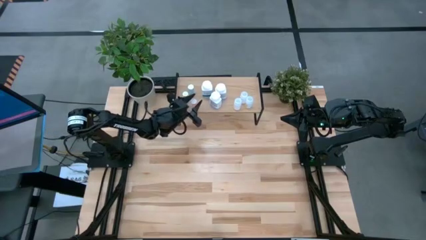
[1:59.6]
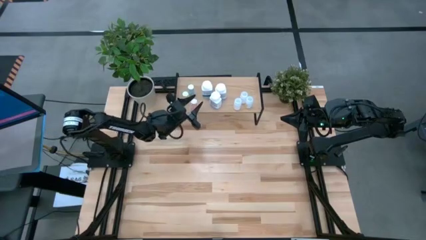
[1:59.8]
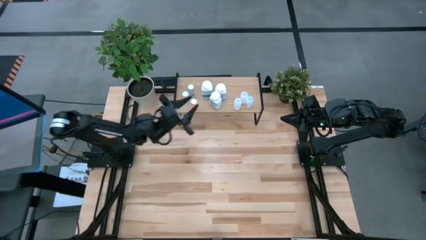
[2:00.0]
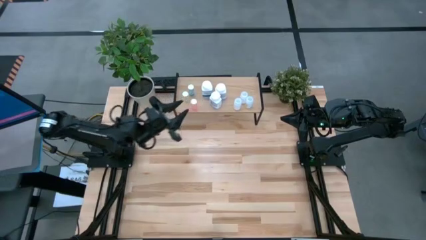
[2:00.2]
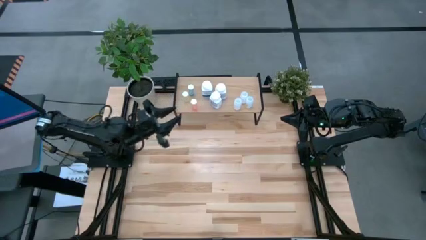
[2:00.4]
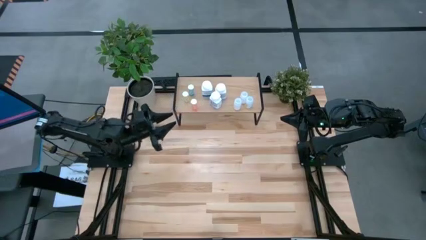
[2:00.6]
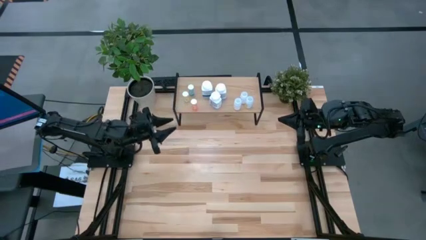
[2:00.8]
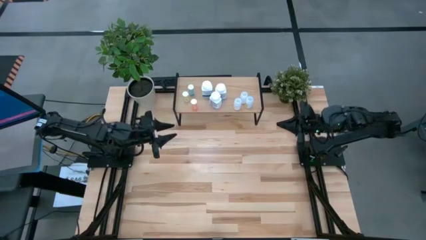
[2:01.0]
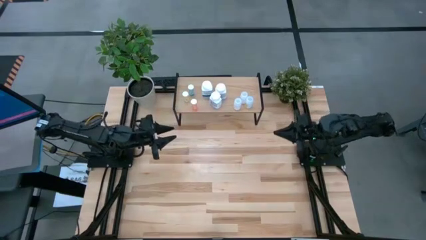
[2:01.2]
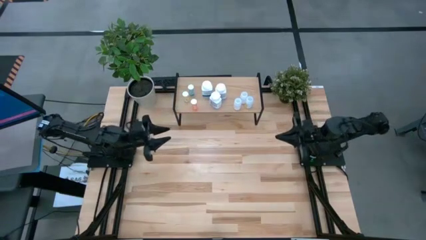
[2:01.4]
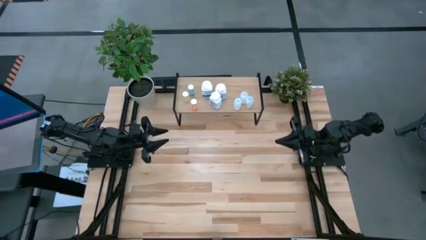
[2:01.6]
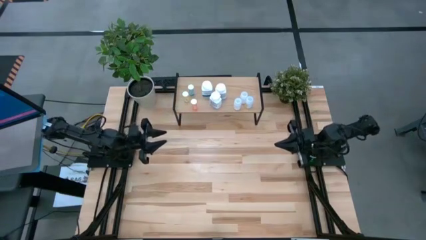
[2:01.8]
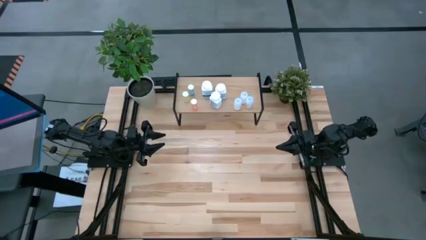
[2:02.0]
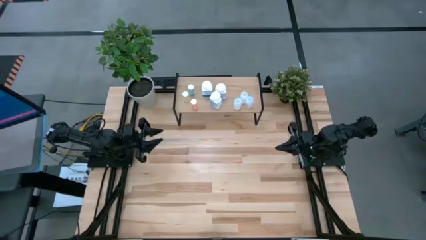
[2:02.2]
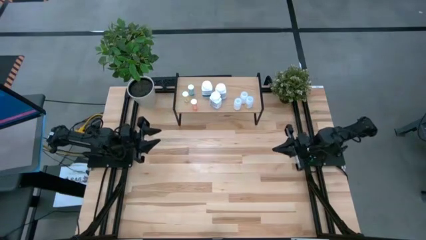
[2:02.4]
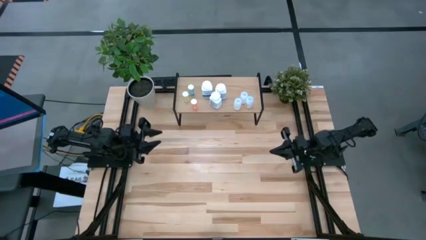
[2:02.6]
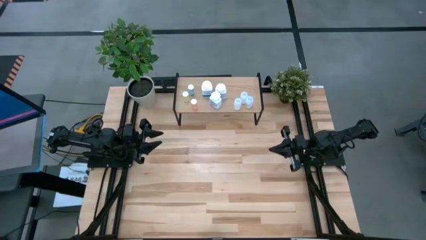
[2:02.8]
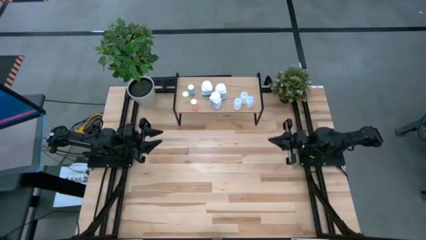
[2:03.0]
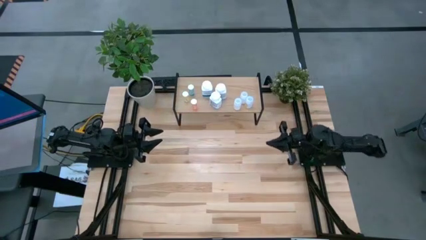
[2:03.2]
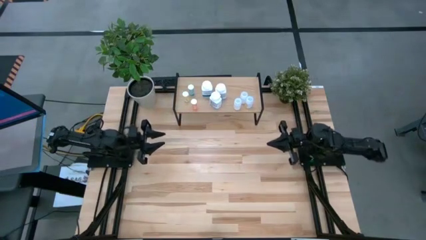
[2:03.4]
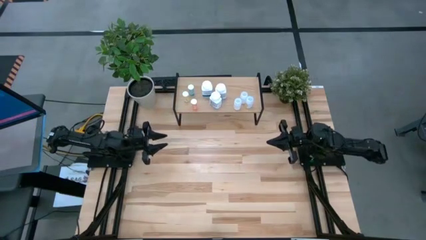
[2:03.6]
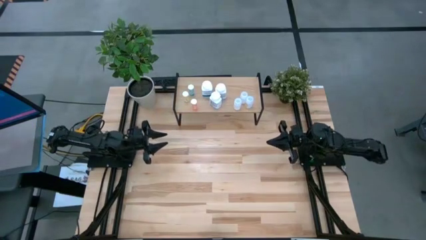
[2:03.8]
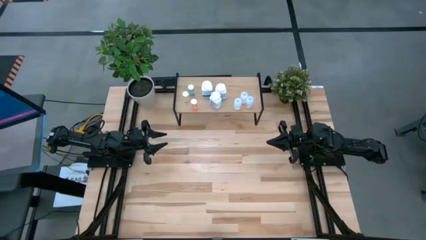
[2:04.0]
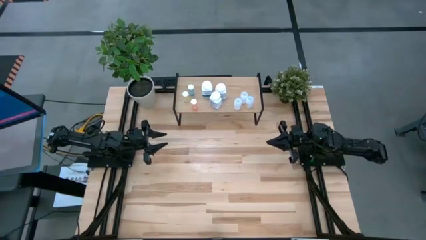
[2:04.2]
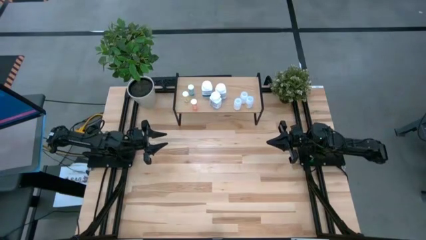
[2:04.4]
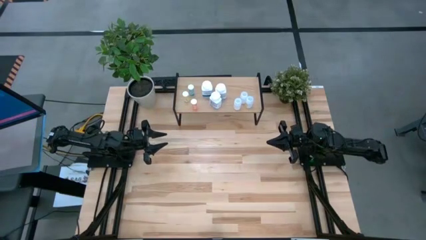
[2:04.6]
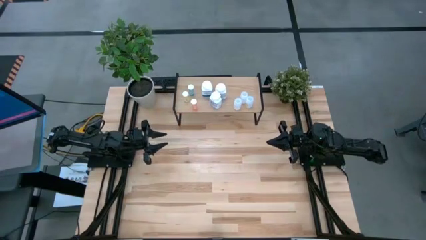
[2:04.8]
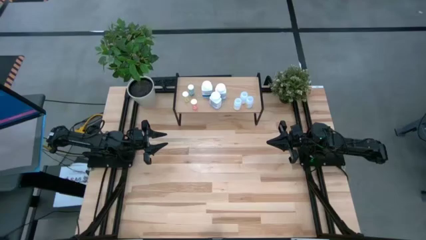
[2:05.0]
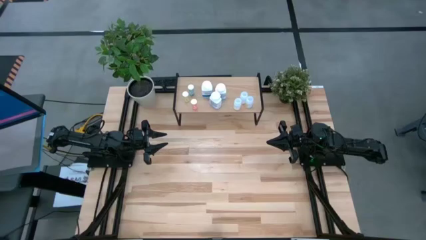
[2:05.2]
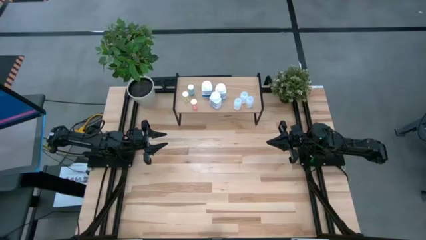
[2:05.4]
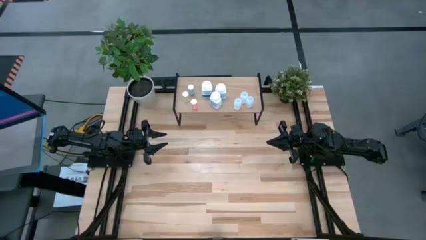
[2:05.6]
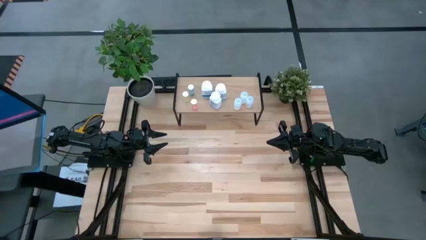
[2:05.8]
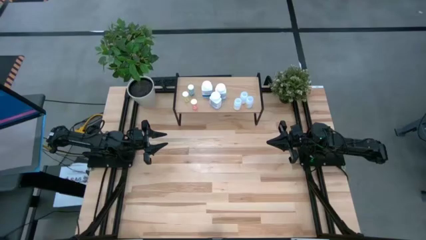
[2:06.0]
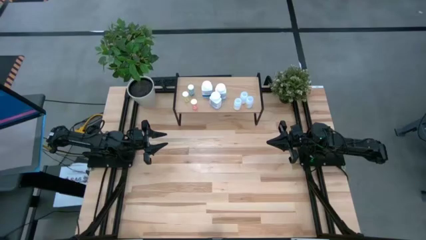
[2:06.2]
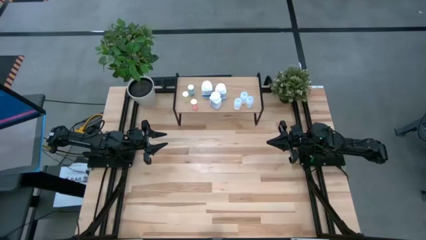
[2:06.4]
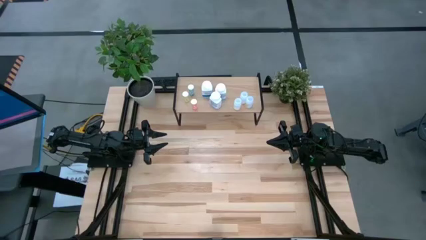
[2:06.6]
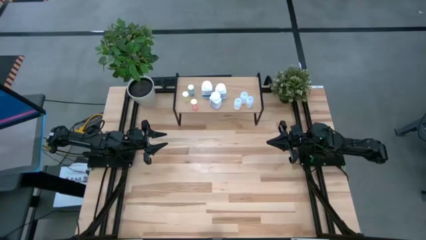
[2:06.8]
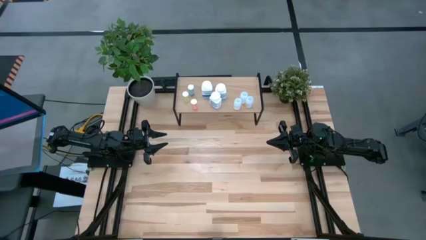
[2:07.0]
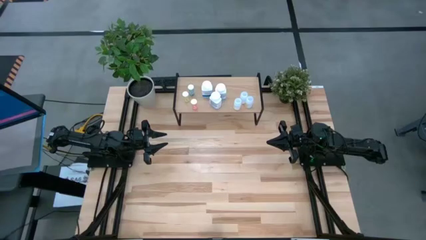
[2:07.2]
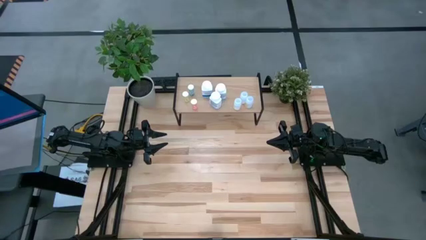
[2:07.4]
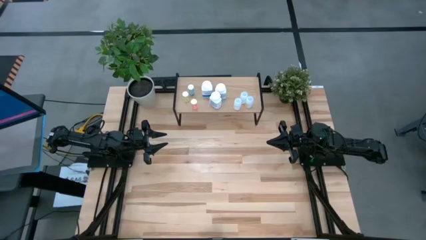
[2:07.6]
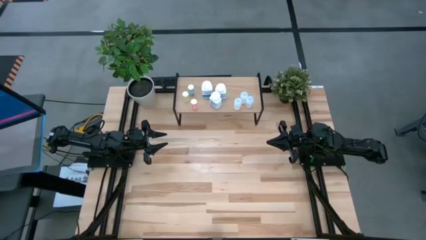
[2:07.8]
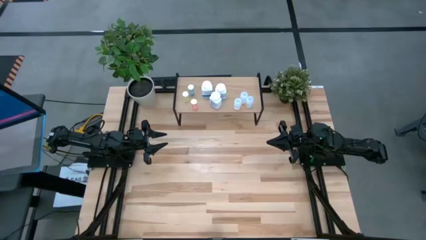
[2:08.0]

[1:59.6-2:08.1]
Task: Pick and place medicine bottles onto shelf by color
Return to Home Position

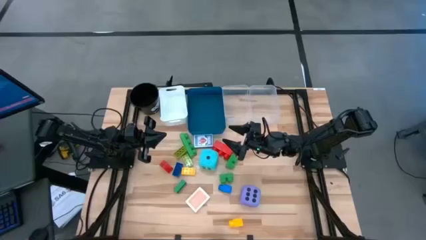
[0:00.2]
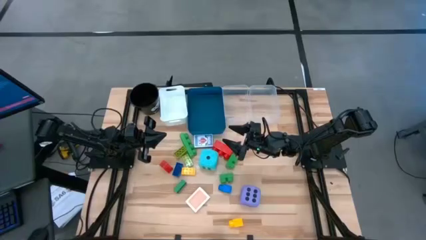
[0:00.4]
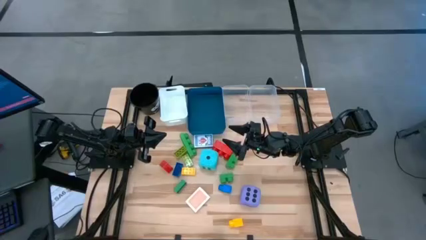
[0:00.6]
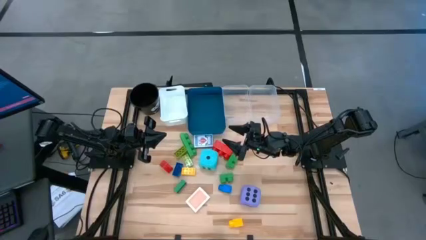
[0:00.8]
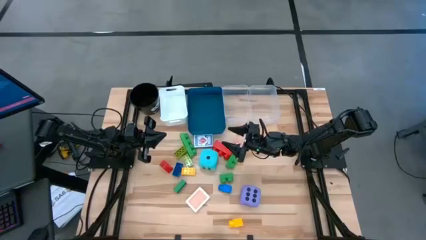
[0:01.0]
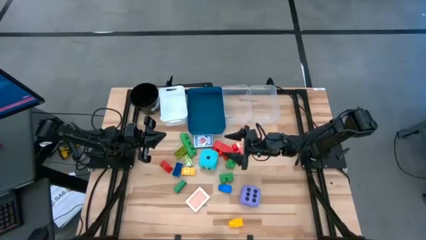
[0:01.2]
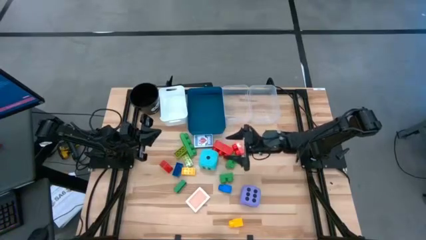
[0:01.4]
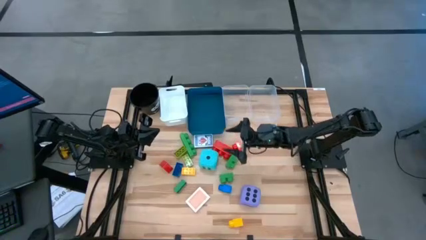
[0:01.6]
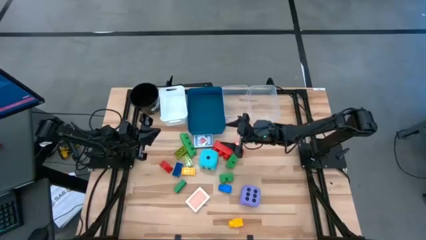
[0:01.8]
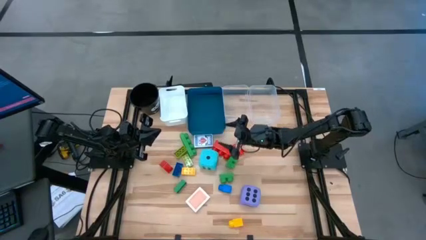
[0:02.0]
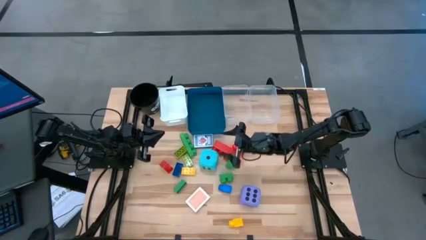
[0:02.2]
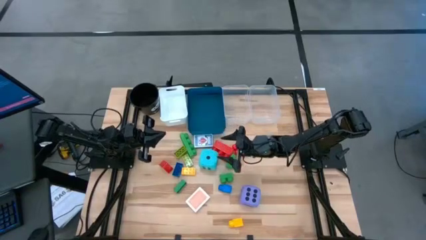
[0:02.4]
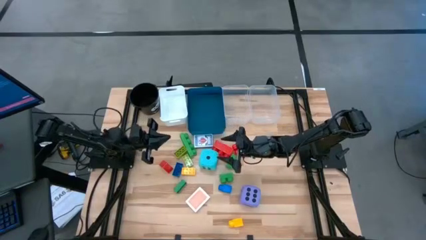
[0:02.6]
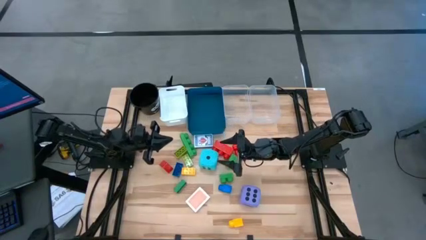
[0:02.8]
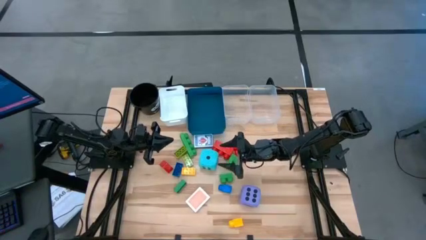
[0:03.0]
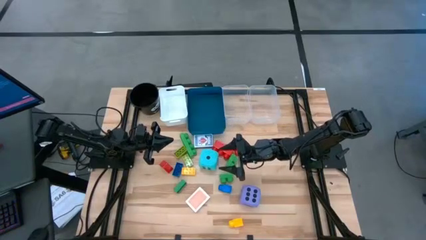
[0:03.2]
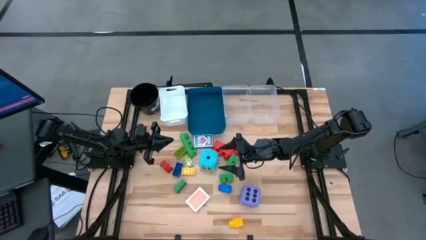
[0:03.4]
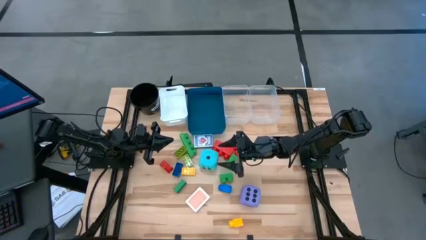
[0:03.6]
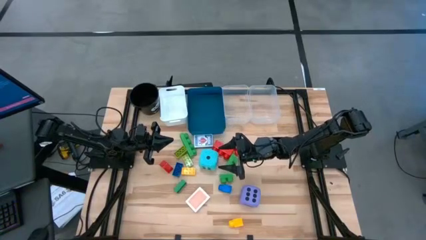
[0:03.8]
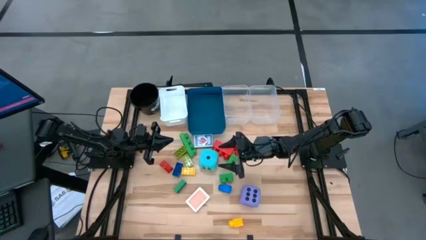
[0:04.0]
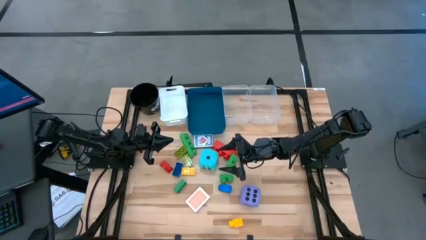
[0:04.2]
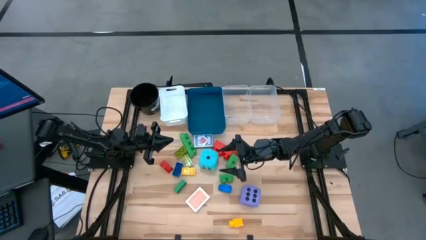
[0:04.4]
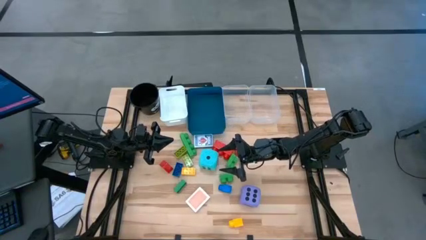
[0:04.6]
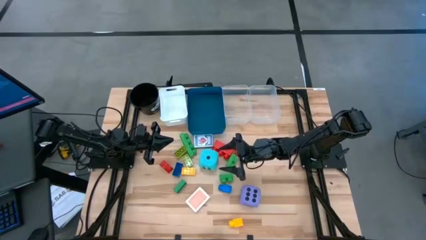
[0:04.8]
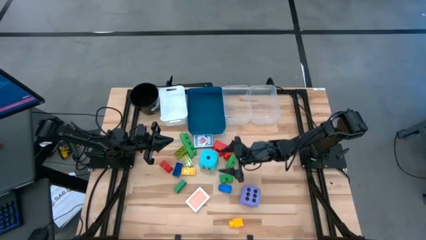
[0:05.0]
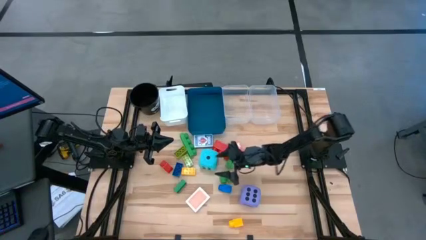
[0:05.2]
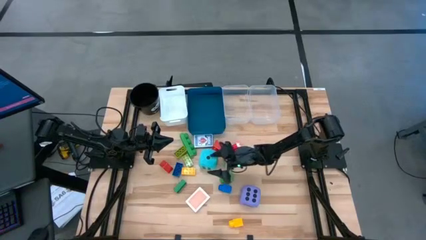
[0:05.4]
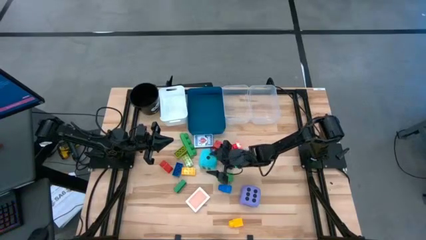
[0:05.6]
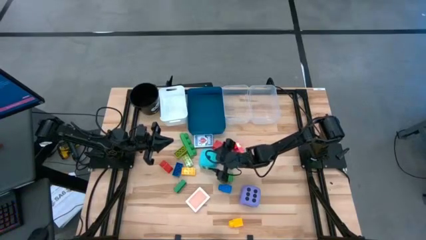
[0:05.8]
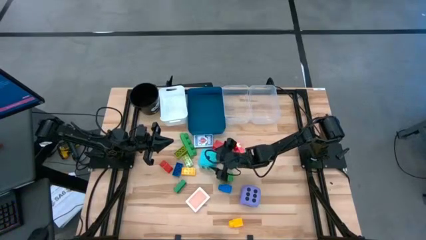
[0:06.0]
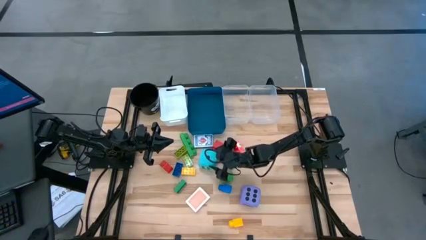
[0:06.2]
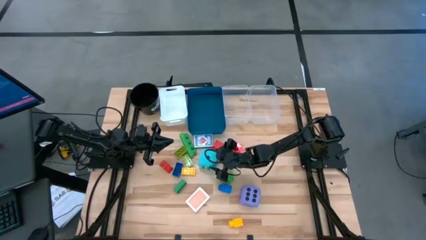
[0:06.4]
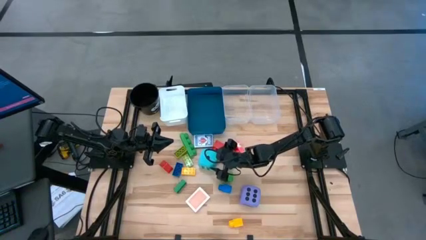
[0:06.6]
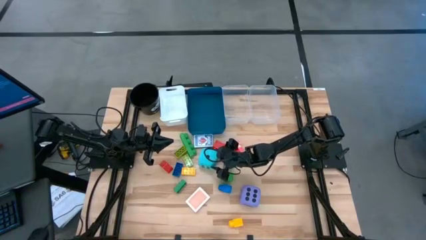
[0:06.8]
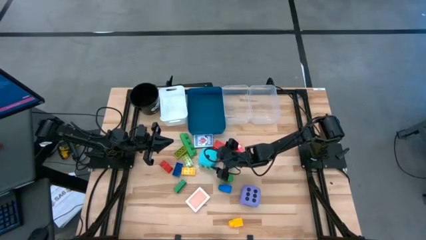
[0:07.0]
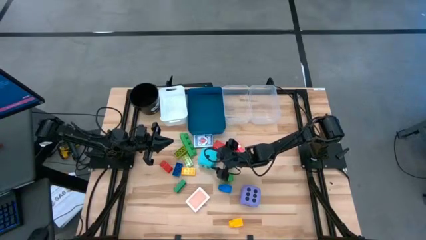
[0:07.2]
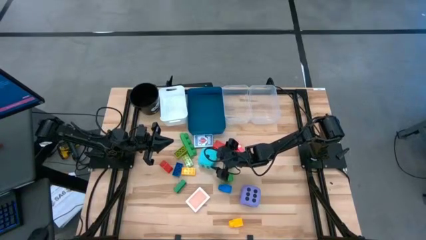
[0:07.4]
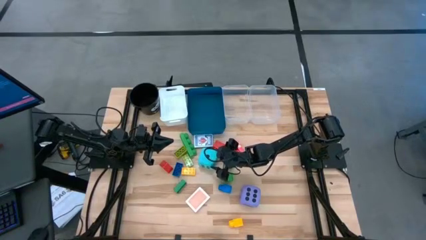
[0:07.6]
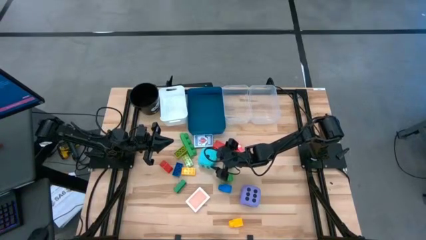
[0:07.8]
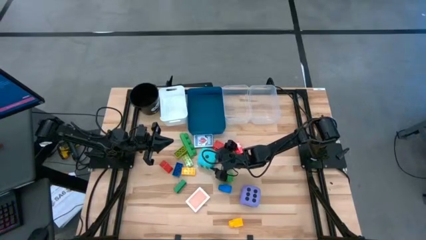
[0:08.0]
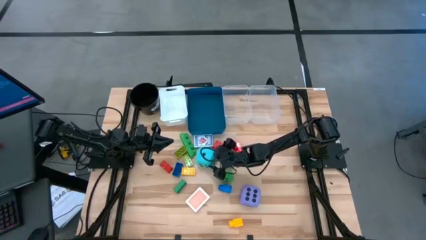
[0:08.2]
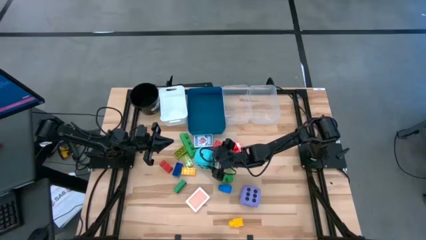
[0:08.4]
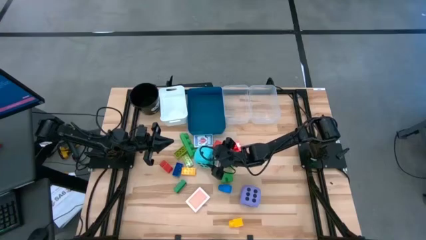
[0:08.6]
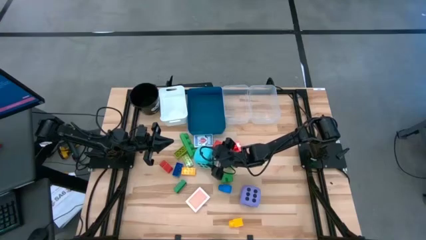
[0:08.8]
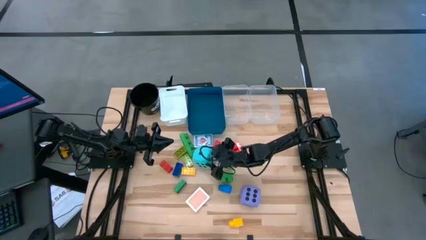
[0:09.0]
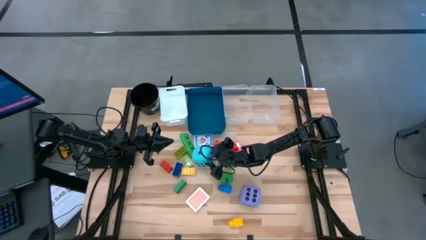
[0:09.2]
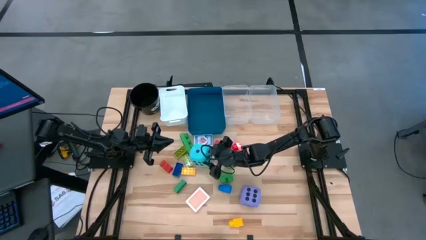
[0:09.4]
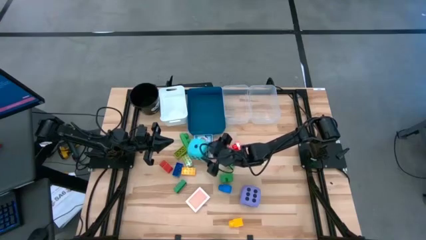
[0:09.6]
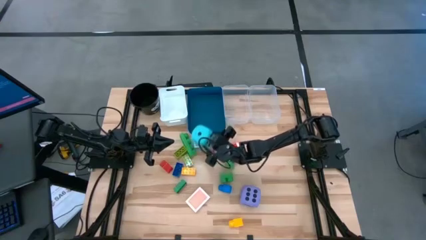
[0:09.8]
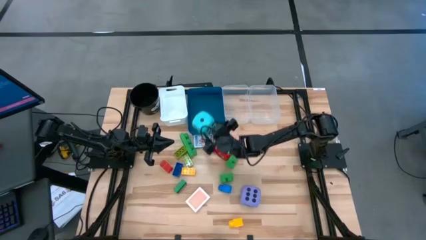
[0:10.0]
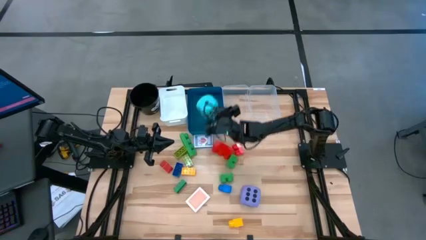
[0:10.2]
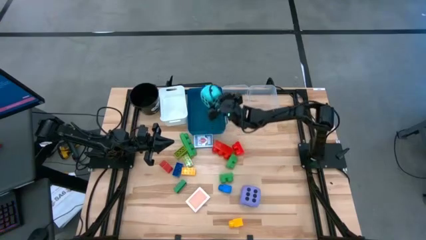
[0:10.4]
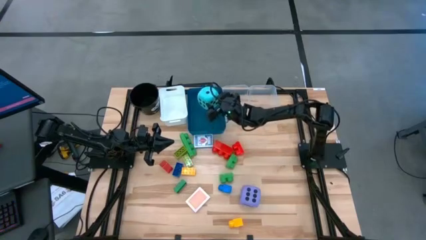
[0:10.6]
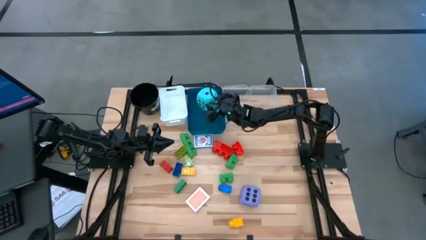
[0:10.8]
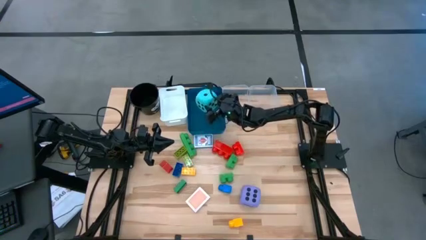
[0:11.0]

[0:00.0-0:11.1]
Task: Pick & Place Toys
Put the light blue dice into the blue bin
